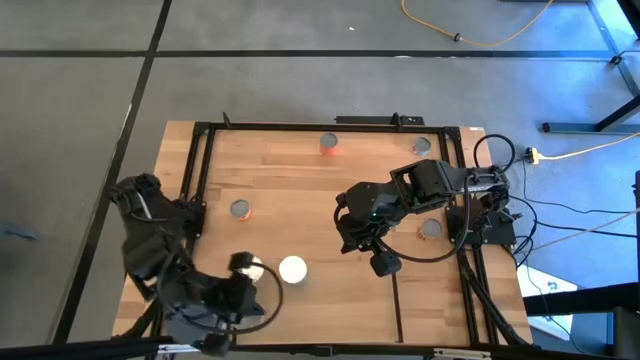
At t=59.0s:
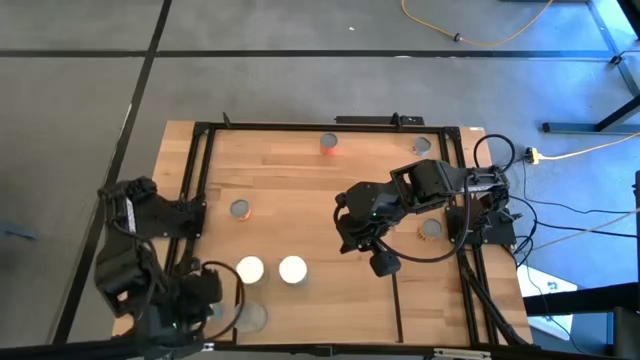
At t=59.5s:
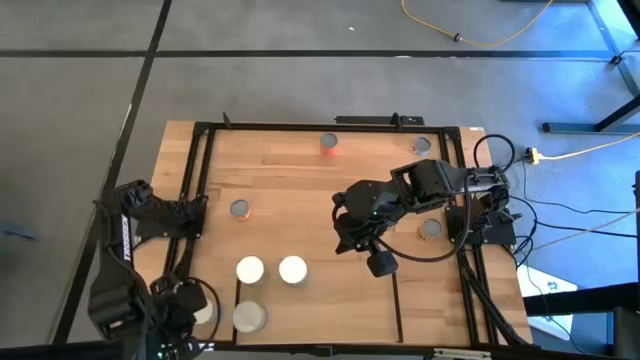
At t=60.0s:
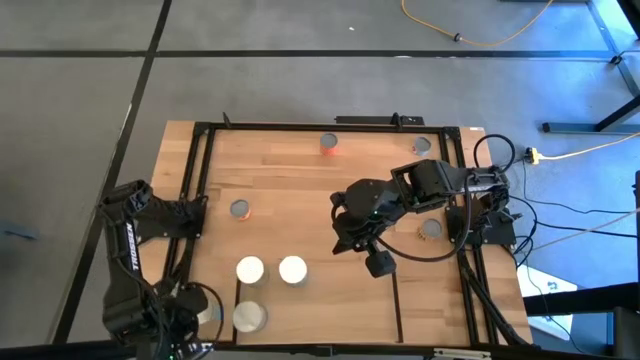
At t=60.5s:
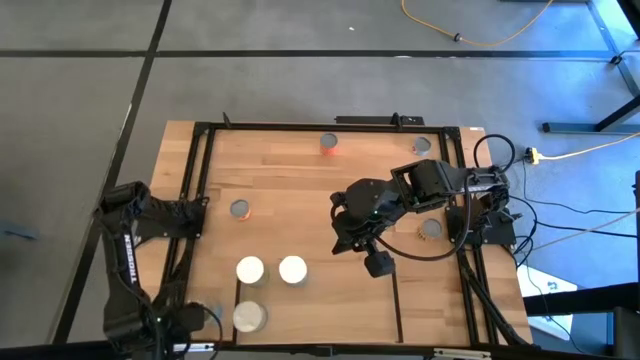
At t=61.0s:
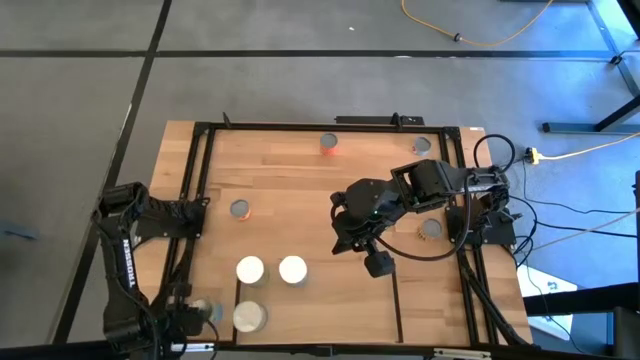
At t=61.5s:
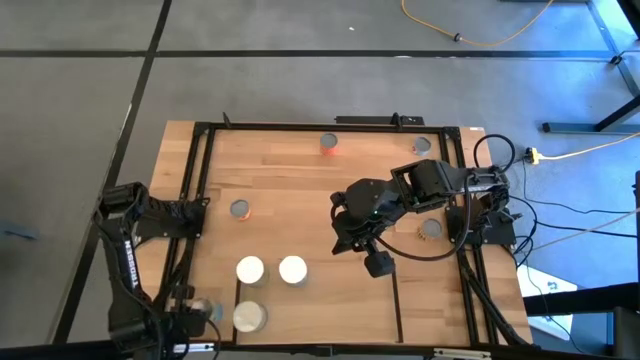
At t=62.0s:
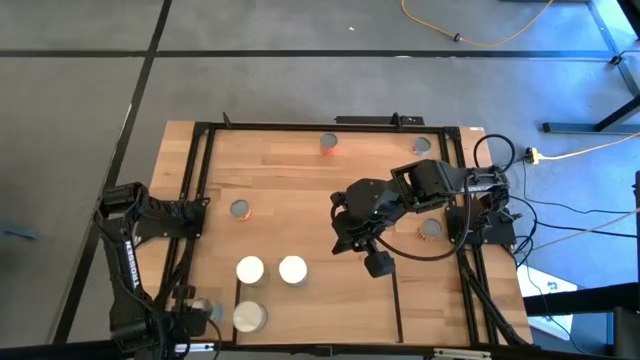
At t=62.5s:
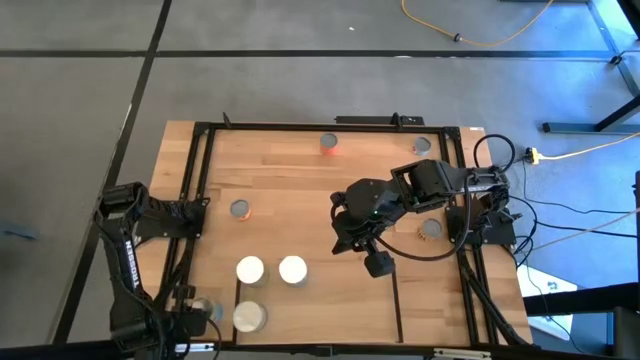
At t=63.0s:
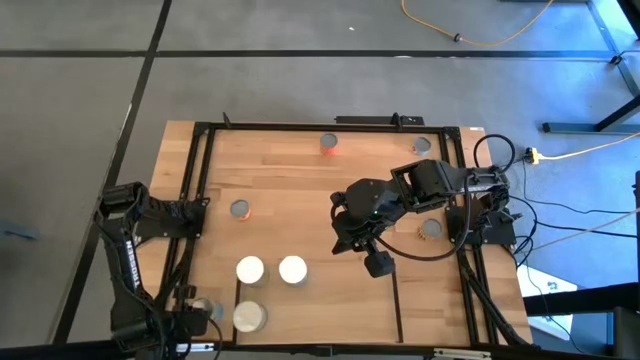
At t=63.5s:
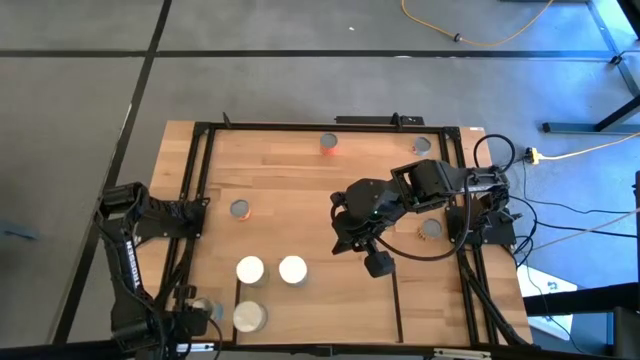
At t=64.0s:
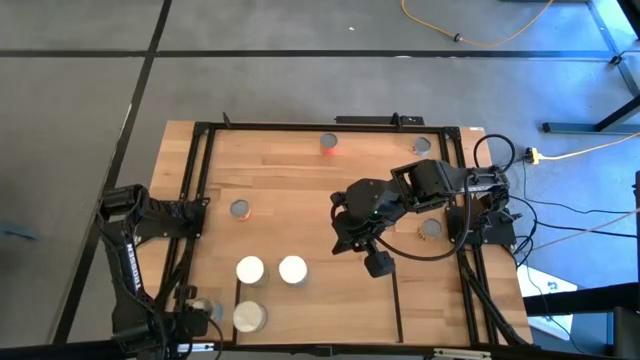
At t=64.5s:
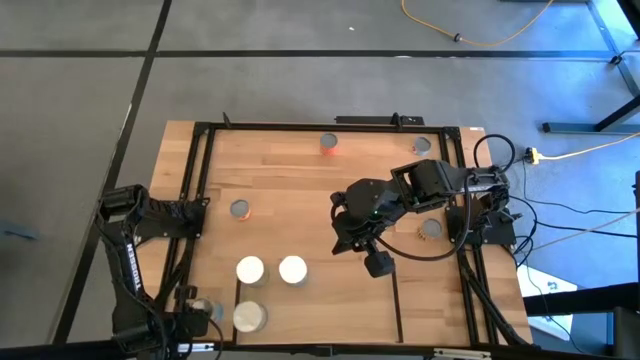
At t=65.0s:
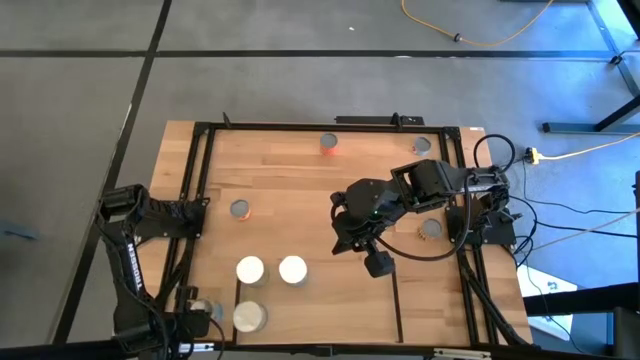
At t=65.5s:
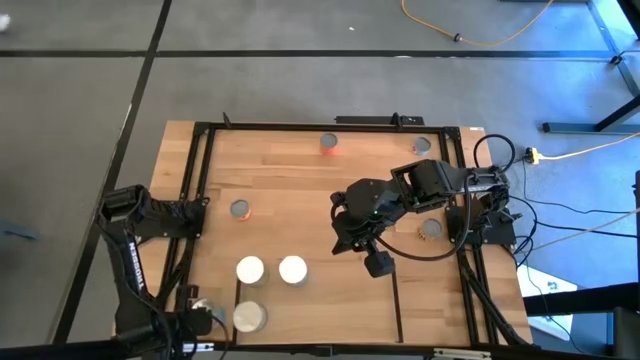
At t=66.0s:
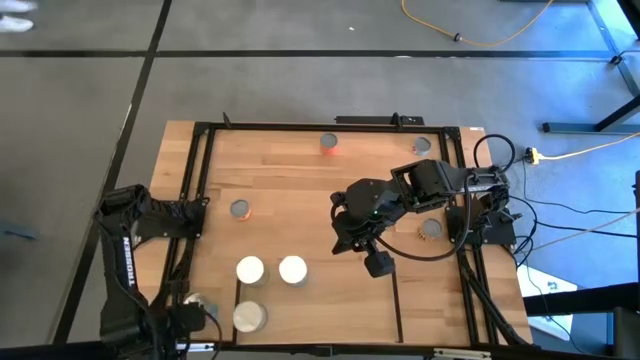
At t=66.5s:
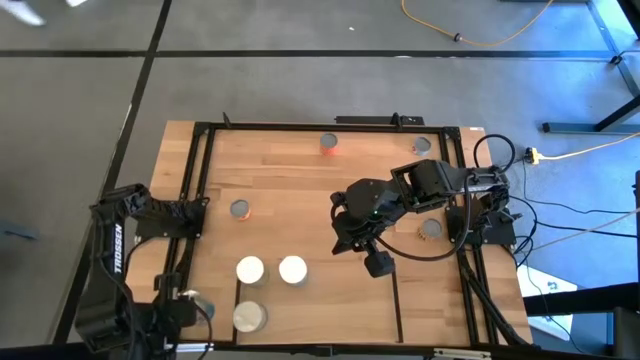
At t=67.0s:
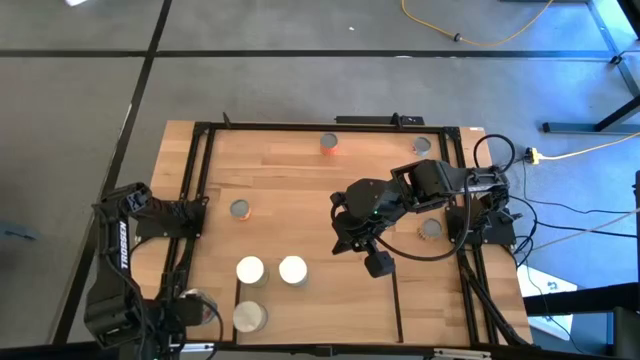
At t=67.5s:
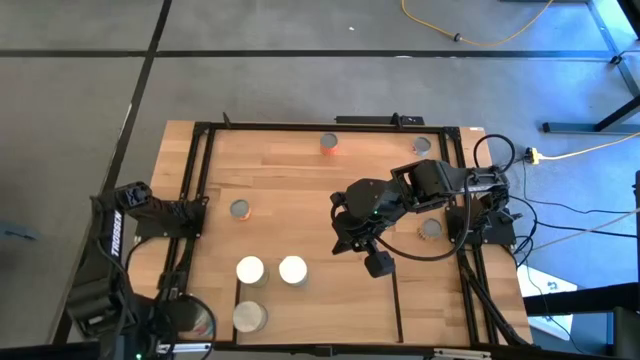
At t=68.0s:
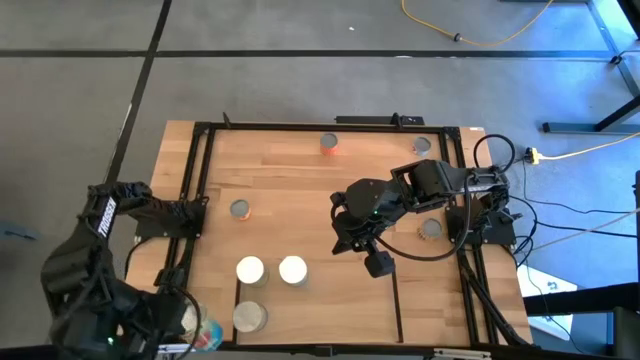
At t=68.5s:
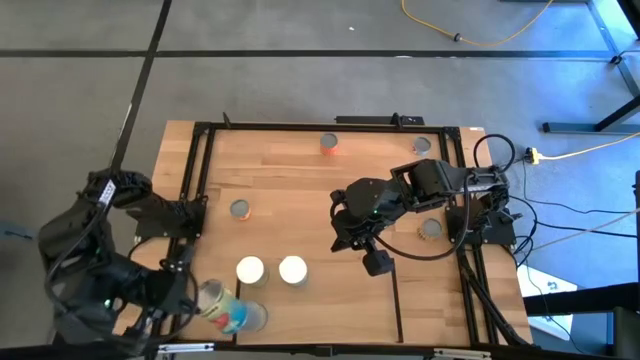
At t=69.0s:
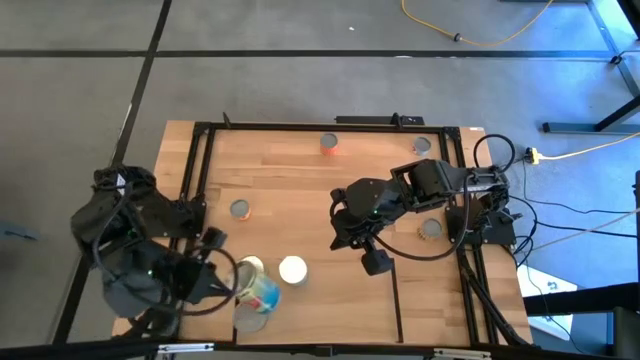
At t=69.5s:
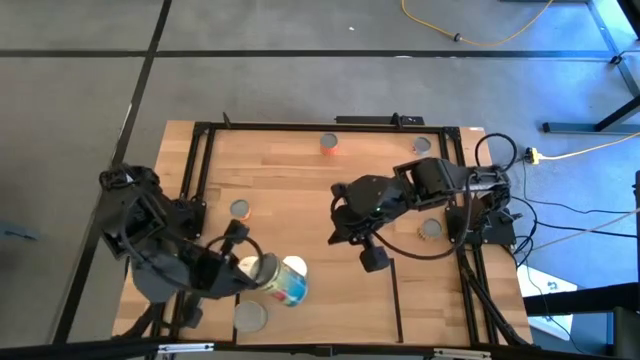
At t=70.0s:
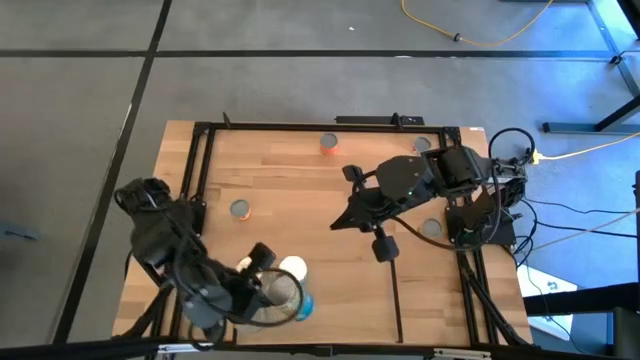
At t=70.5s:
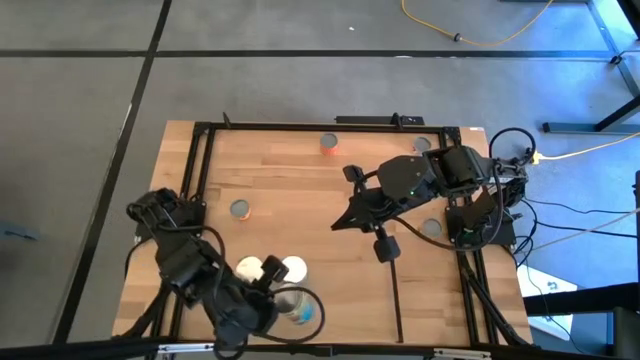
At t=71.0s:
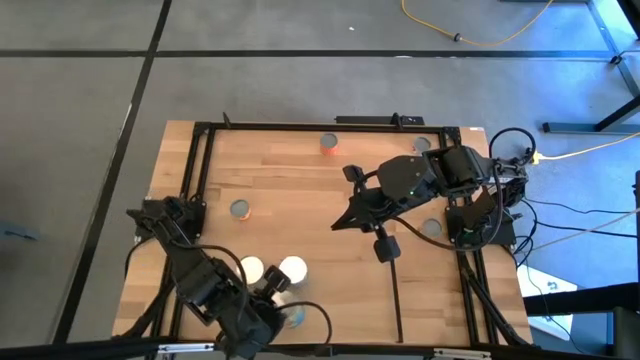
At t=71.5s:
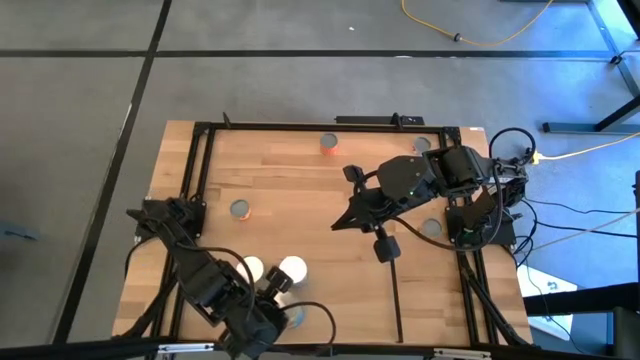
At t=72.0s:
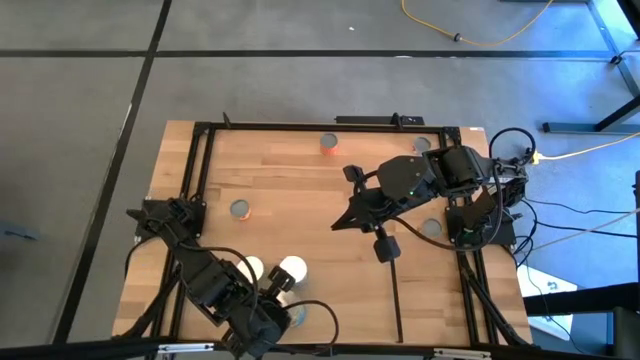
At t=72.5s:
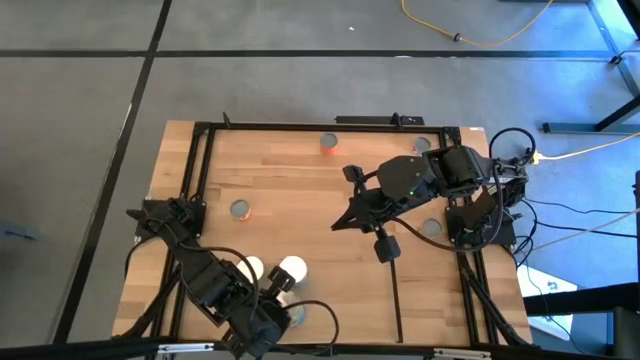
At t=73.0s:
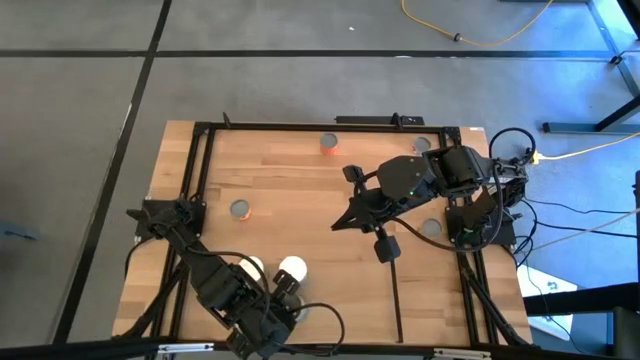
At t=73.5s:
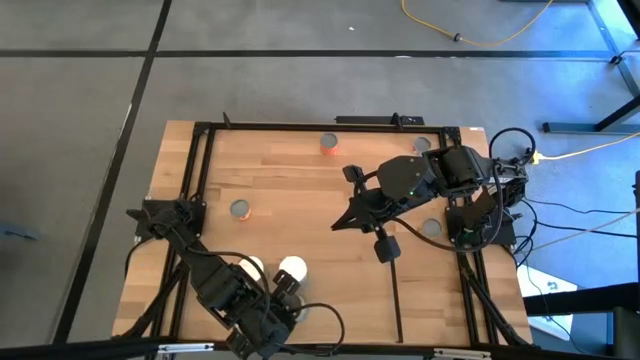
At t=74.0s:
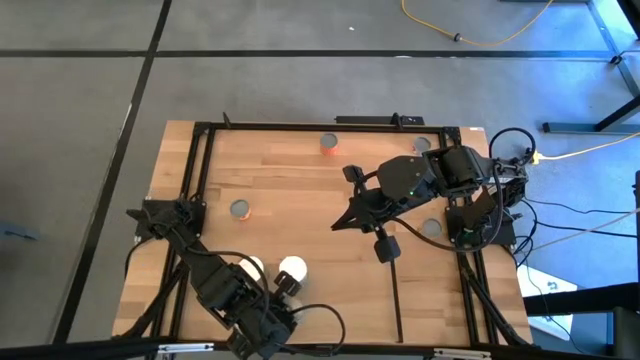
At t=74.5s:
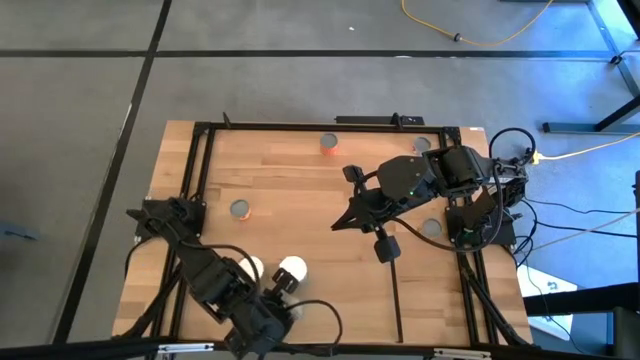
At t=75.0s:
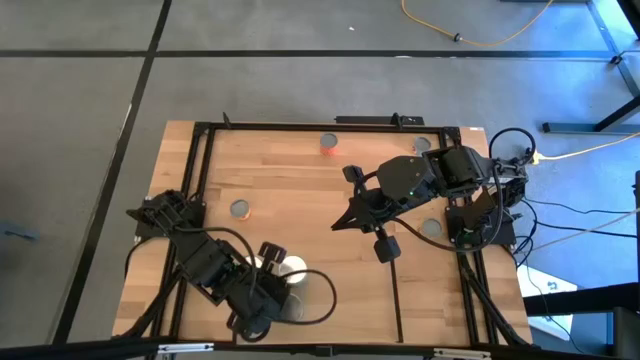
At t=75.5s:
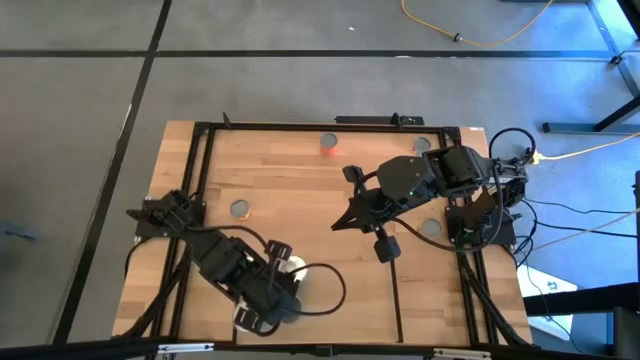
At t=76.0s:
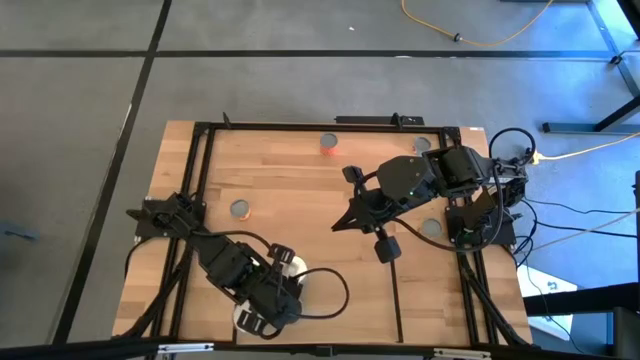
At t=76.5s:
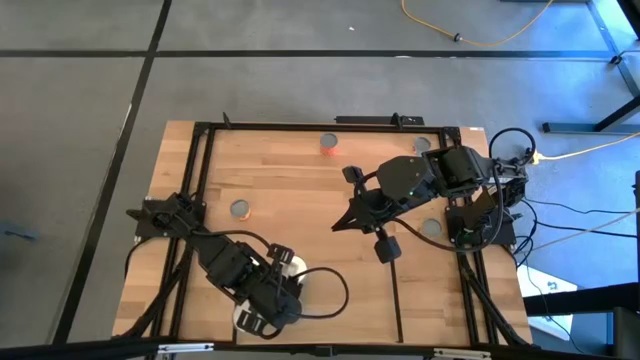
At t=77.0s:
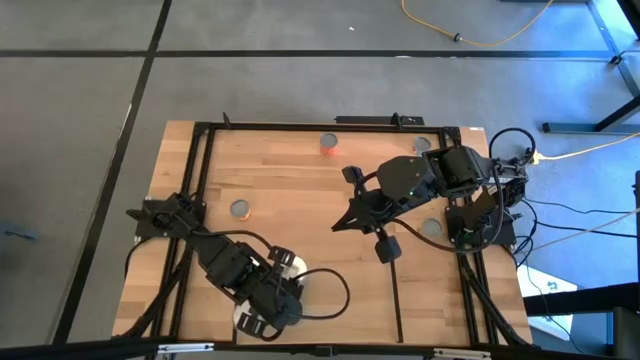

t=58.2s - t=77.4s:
Task: Pick and place cans onto a shelf
Put the canned tomatoes on the shelf

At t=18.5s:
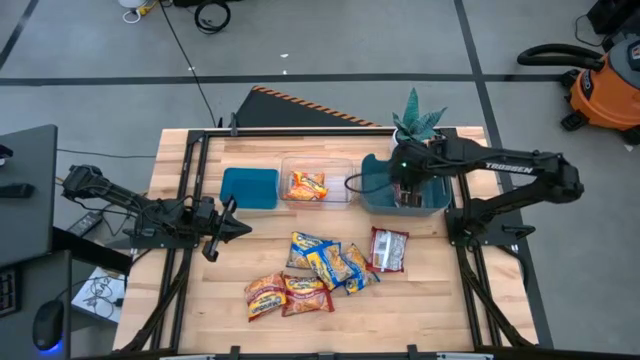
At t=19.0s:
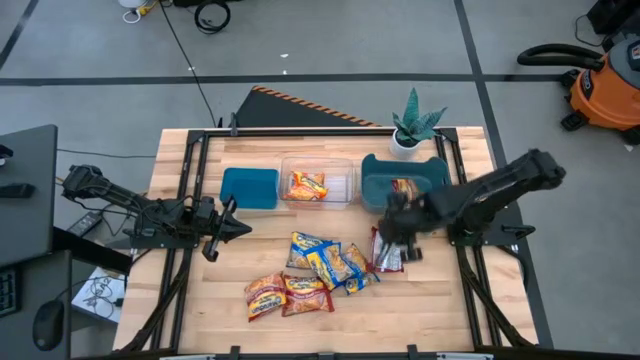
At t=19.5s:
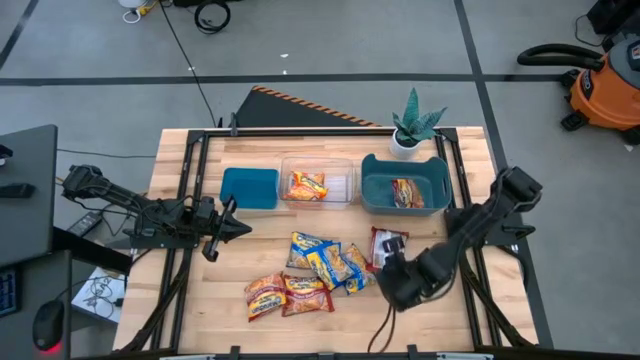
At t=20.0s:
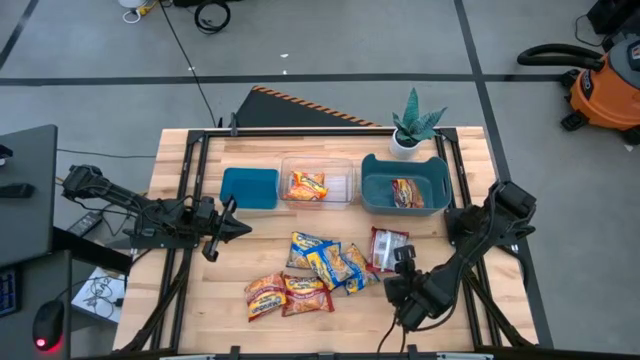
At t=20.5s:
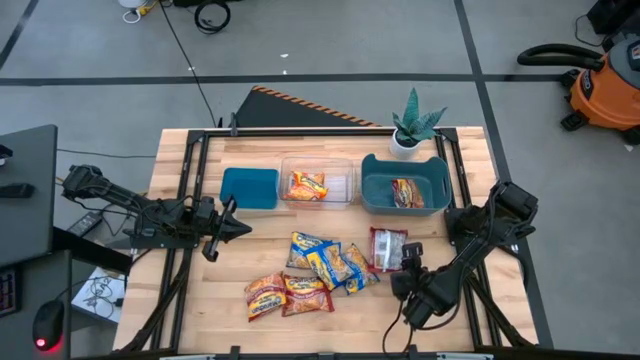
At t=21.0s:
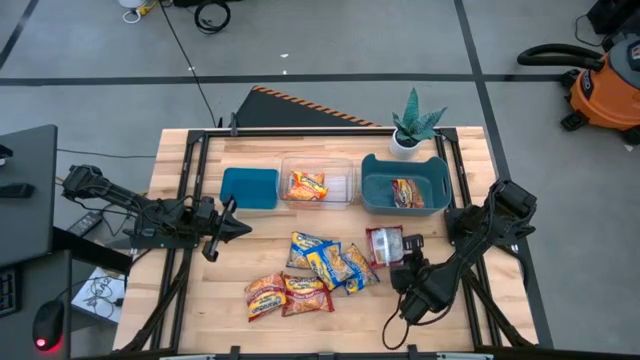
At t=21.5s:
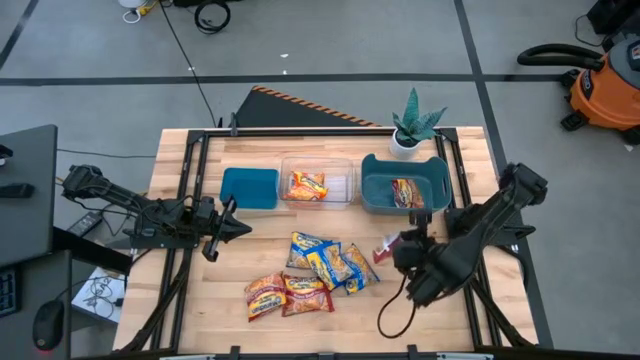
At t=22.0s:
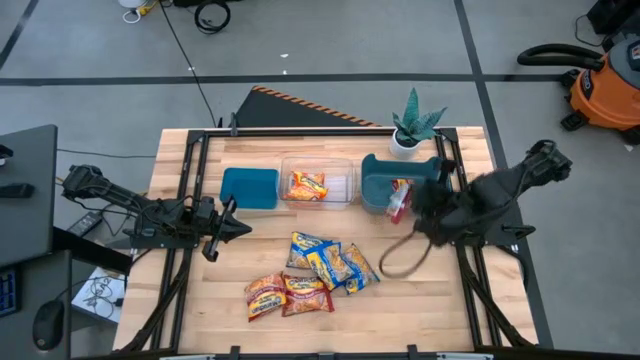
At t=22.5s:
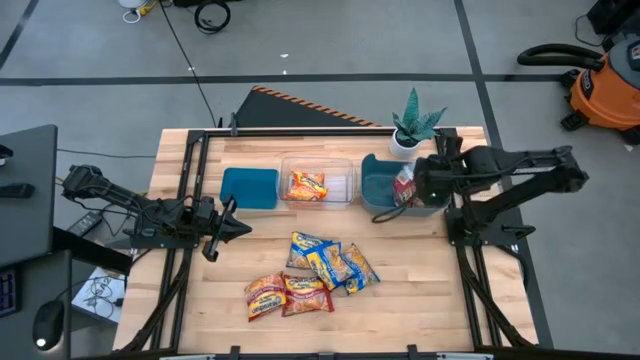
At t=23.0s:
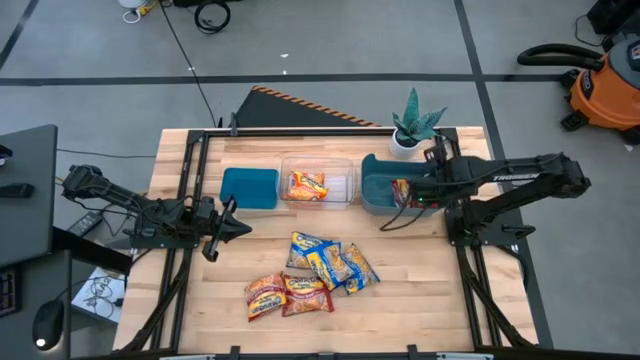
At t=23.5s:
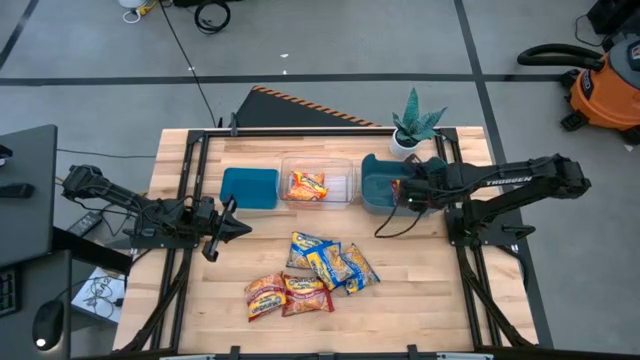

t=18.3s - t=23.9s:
Task: Sort Maruchan noodles
Put the red noodle pack into the green bin
